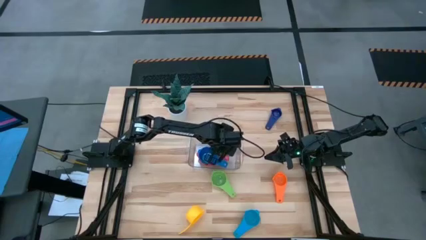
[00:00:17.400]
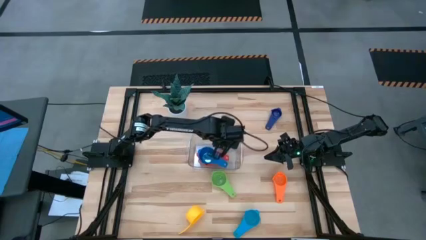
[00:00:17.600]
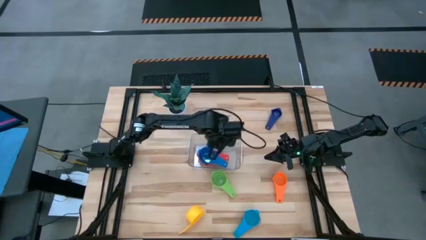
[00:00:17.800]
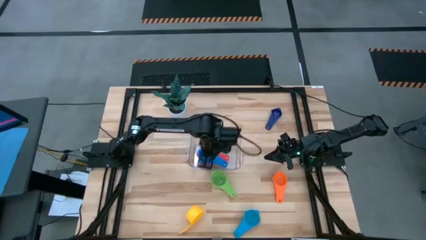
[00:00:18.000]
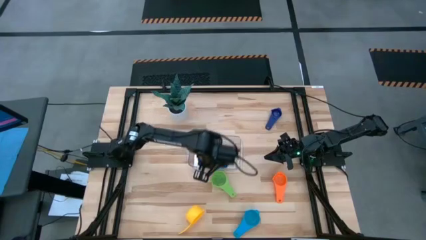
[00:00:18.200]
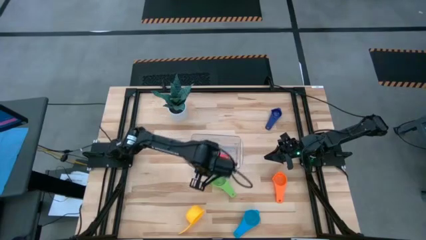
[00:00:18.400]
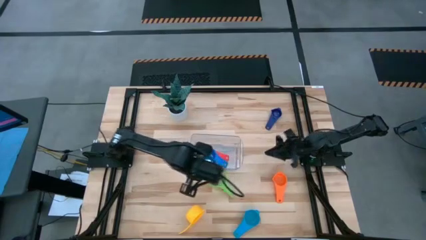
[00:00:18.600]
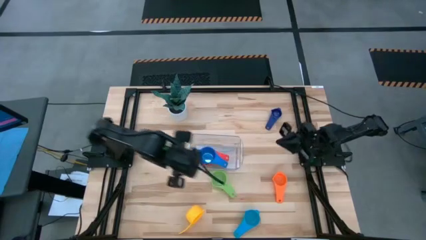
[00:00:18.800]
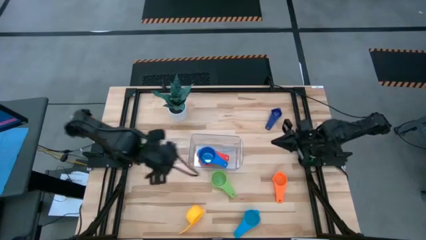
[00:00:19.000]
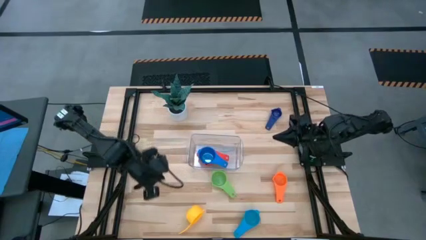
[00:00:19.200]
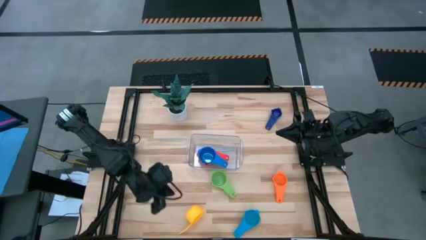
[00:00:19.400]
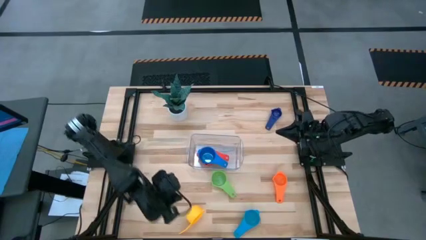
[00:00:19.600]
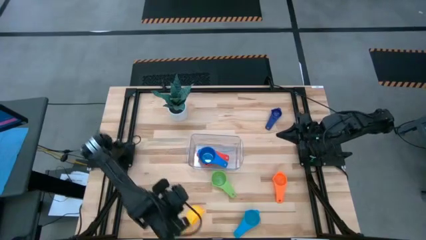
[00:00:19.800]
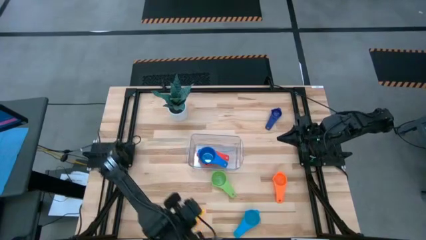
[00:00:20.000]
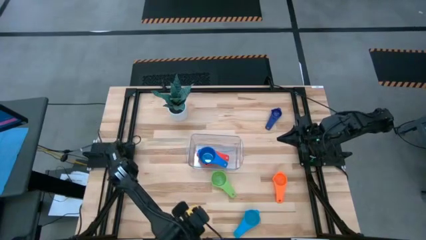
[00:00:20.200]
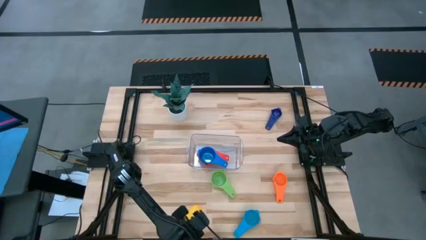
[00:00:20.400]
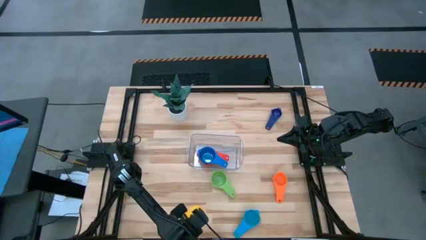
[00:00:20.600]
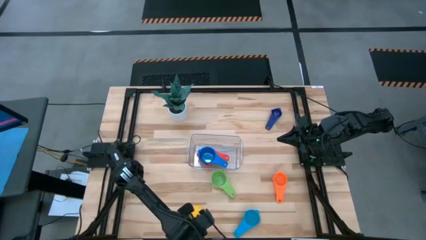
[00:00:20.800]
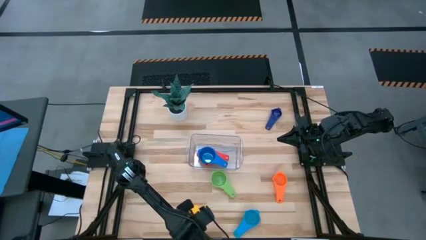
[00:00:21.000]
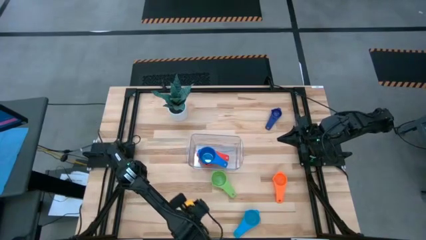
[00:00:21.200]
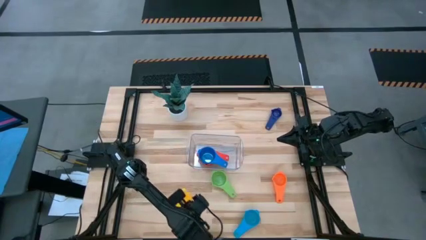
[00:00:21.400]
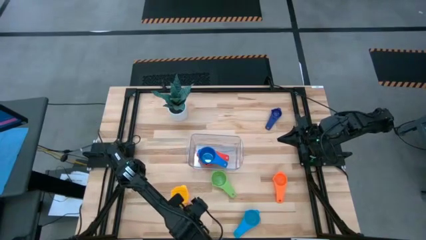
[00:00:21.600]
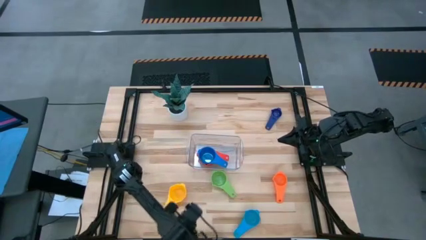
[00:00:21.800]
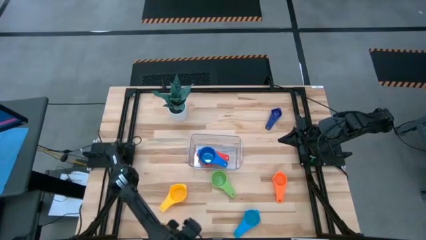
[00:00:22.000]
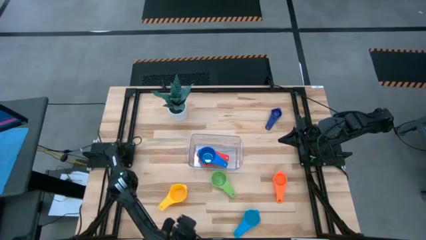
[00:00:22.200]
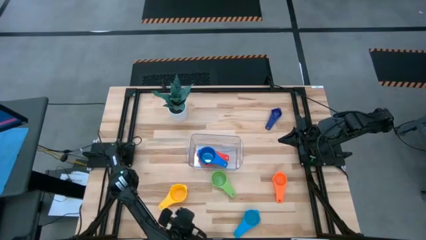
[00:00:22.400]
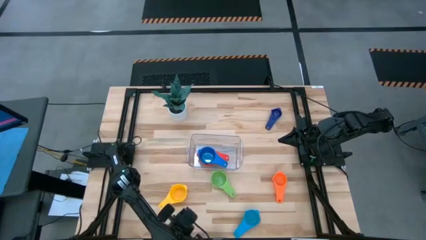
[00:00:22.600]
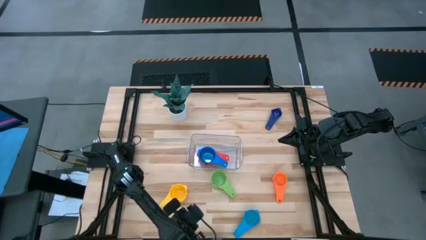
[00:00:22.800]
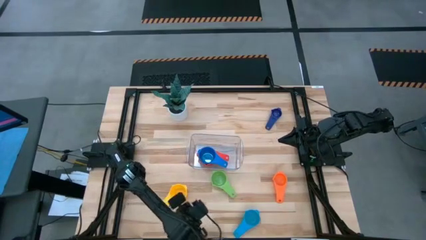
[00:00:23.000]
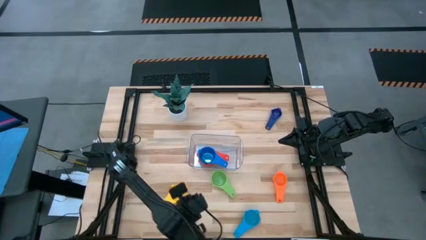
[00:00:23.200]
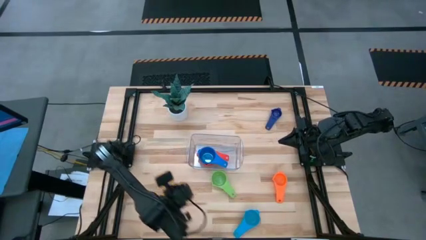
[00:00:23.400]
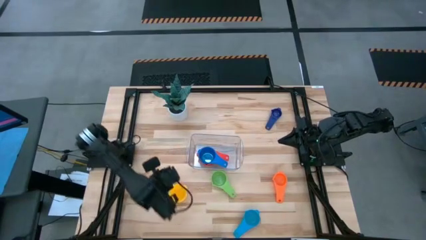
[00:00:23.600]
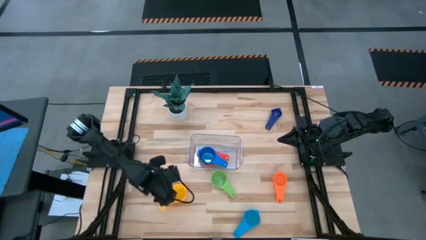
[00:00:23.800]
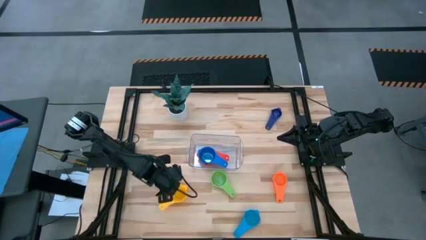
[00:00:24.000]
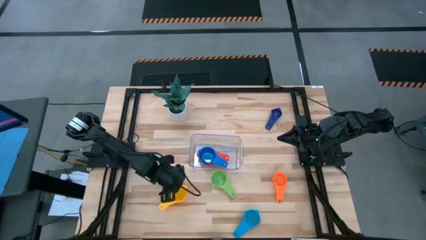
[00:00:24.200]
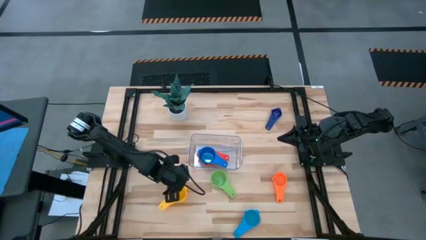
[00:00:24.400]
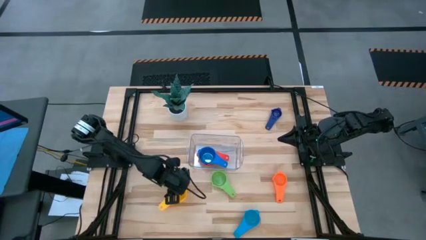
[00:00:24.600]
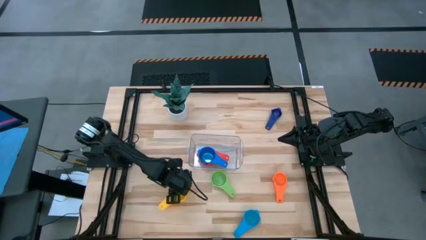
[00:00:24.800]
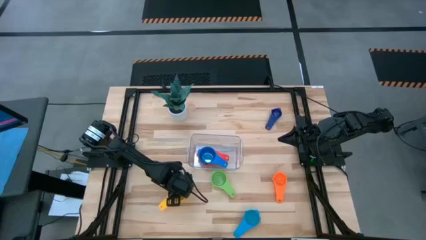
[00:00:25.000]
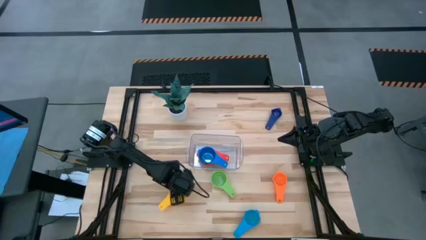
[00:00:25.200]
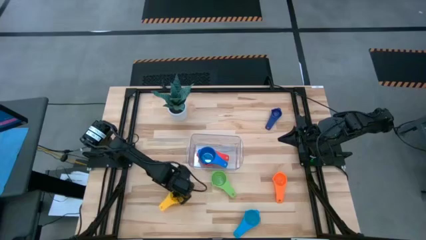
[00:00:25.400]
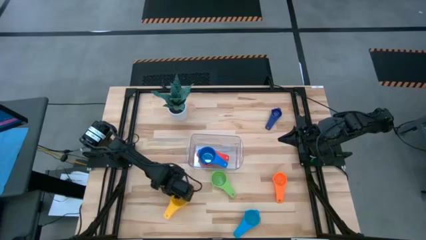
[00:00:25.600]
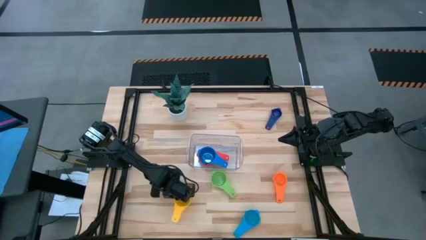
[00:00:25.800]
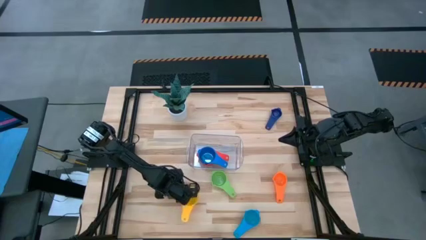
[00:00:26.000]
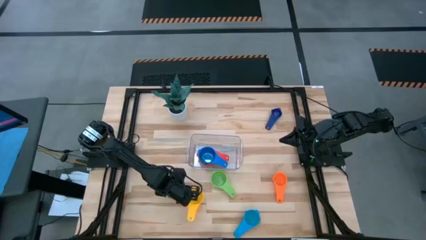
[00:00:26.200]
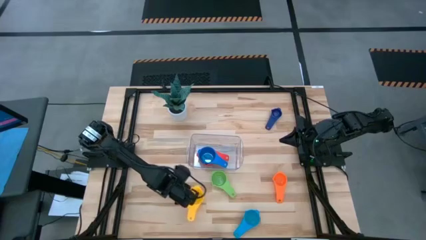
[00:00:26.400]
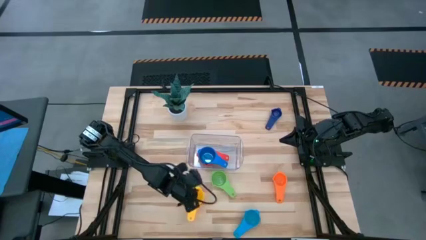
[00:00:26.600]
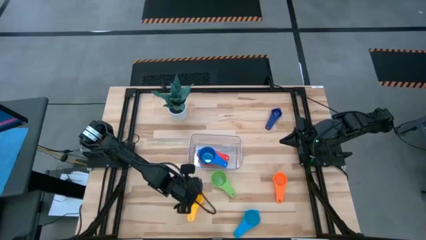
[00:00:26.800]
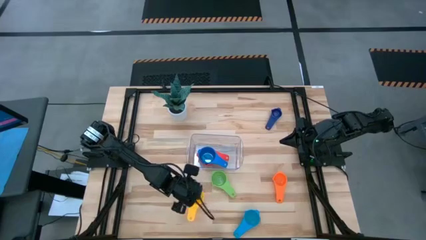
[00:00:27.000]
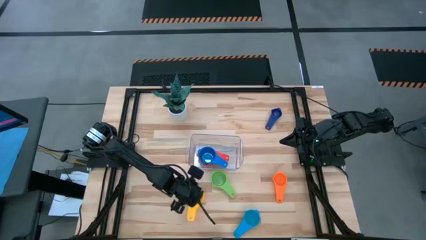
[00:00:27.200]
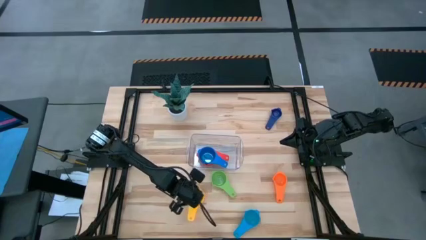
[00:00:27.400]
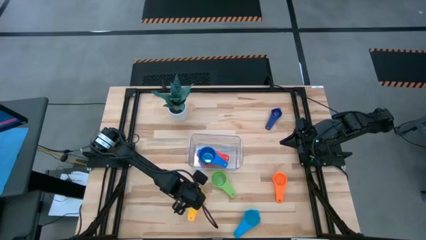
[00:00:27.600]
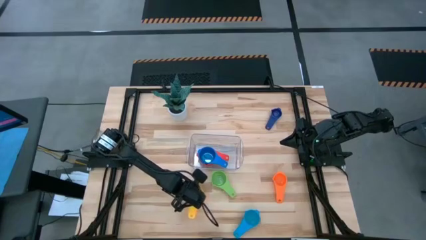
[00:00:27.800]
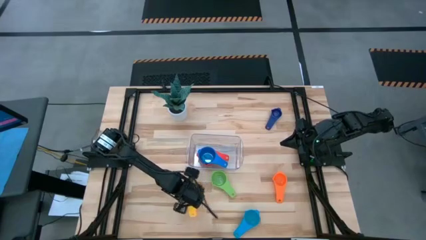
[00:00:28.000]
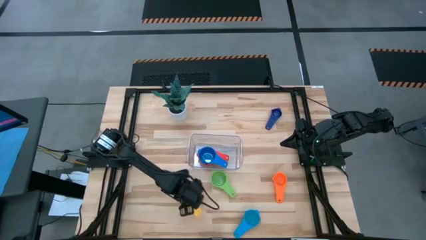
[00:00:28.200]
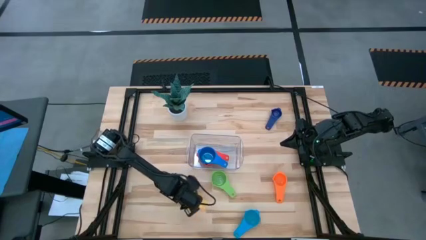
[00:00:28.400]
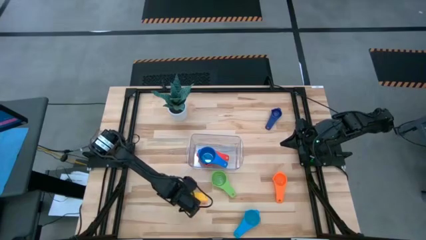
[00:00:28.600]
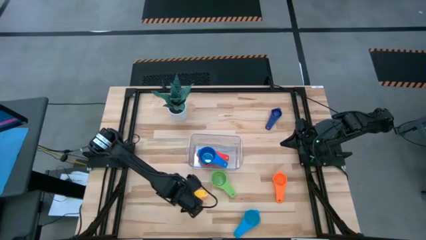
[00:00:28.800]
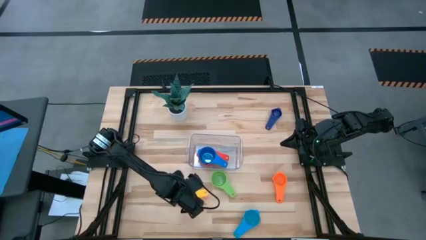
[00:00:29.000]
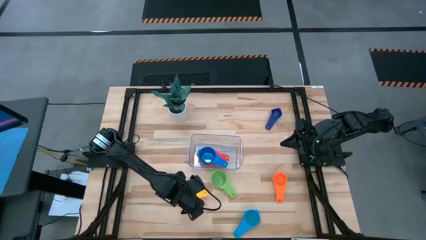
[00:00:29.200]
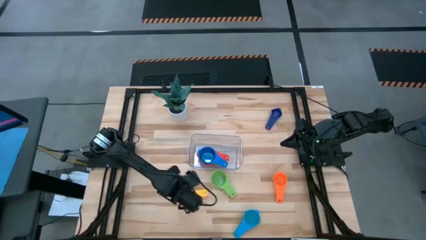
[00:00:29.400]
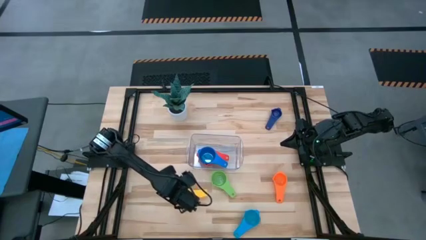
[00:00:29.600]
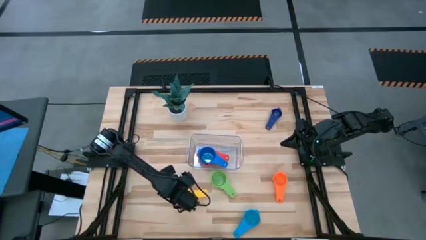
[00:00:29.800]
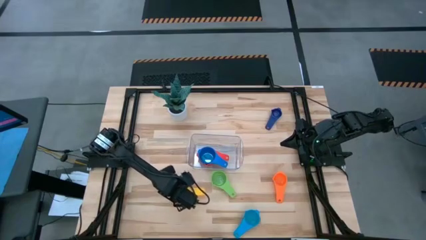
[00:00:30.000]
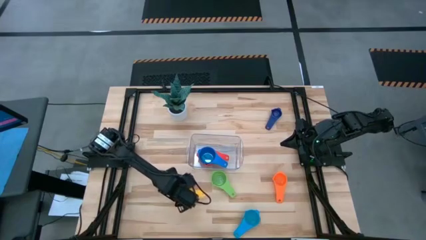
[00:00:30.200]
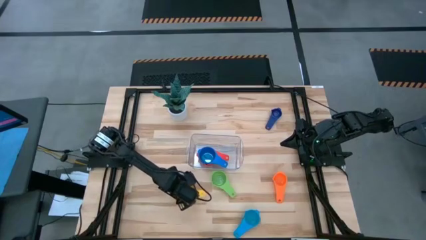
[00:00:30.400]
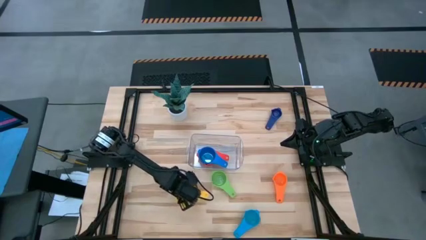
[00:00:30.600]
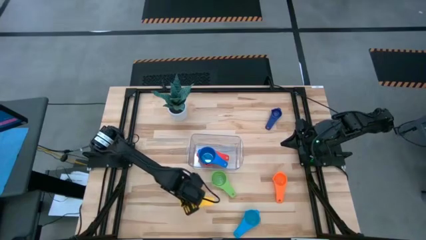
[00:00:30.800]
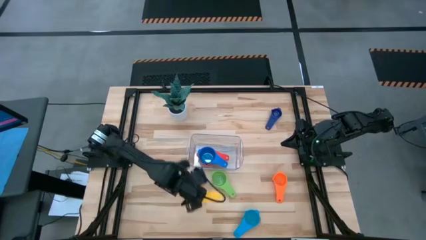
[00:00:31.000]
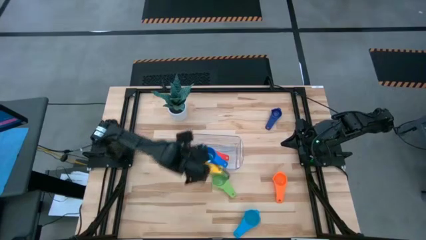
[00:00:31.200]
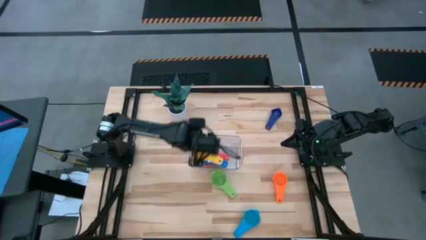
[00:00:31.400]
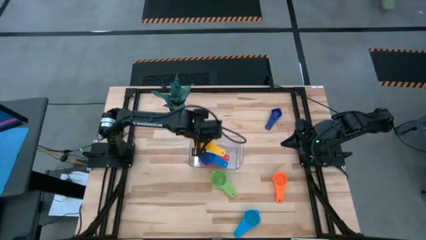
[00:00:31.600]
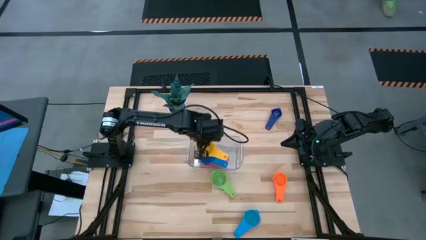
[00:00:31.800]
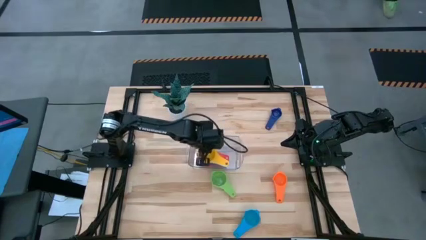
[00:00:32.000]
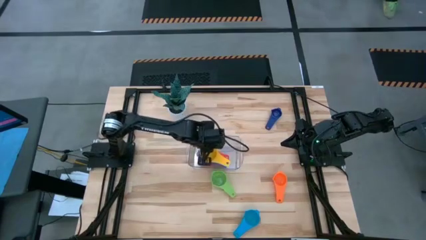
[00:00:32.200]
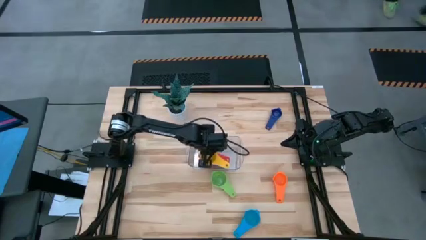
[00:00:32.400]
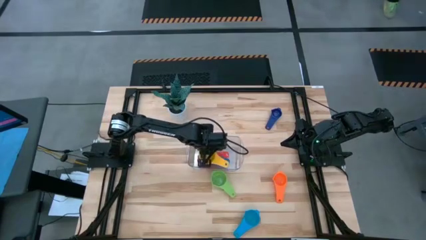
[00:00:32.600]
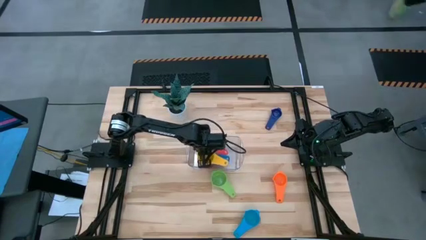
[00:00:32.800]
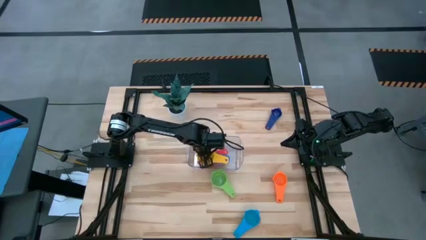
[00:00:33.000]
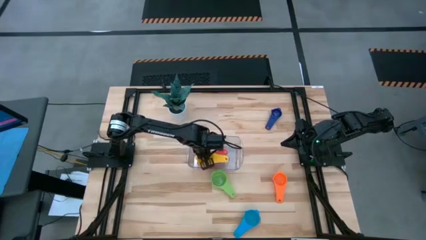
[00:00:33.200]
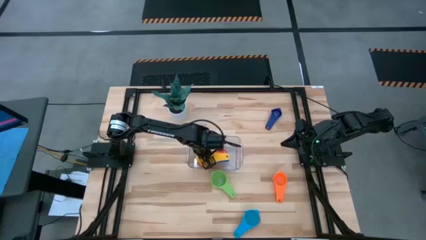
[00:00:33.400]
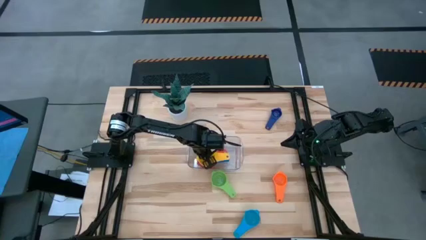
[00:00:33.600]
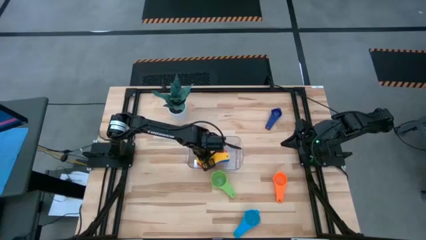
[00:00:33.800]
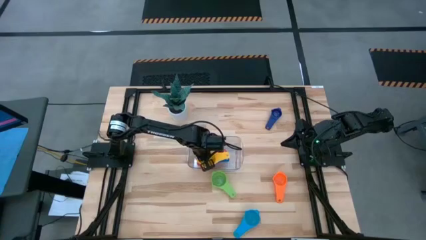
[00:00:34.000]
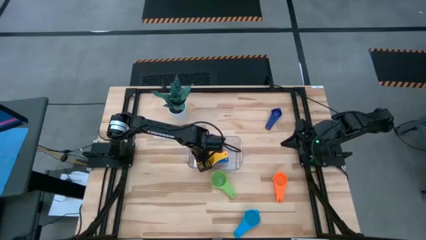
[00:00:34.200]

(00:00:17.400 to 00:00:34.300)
Task: Nest measuring cups in basket
Stack the yellow measuring cup into the blue measuring cup
